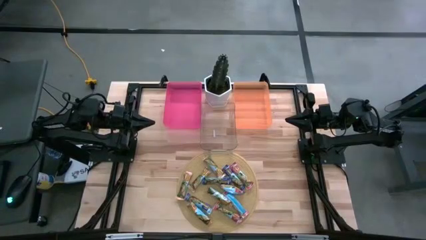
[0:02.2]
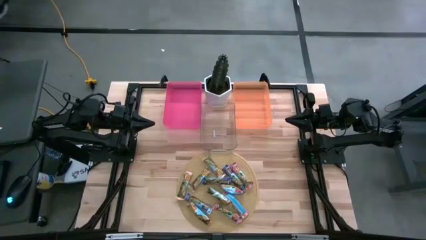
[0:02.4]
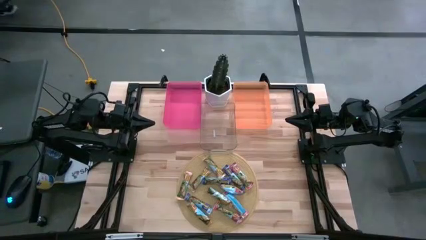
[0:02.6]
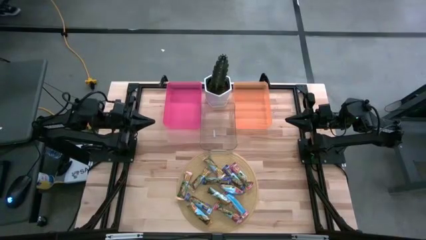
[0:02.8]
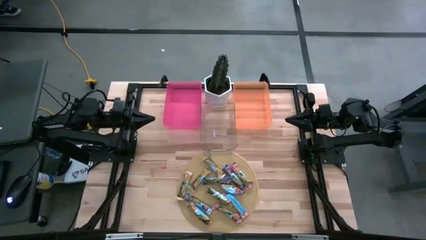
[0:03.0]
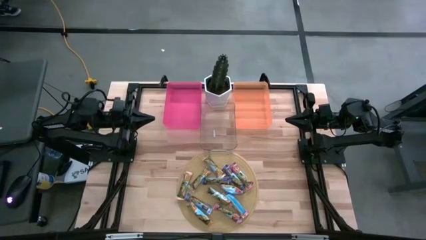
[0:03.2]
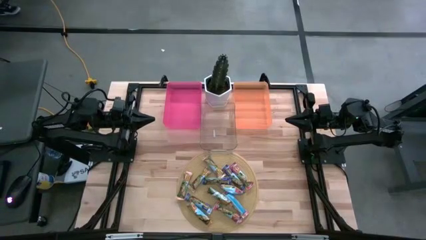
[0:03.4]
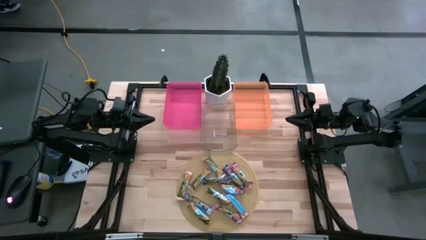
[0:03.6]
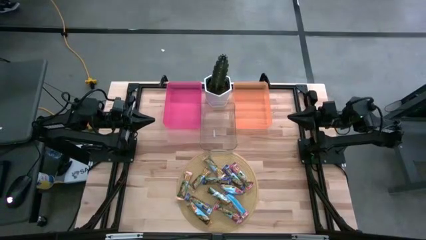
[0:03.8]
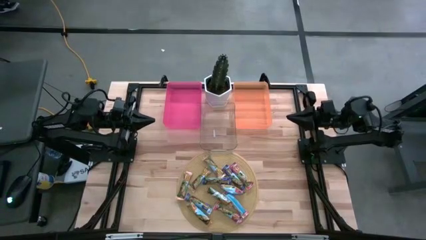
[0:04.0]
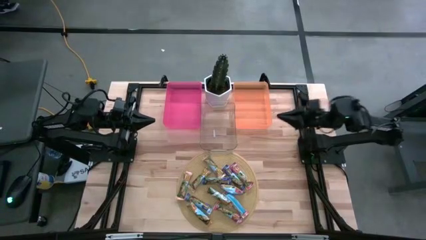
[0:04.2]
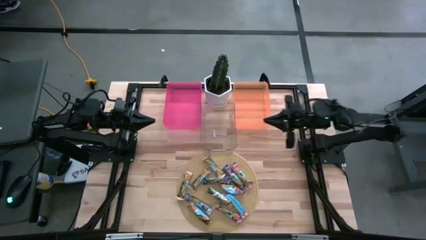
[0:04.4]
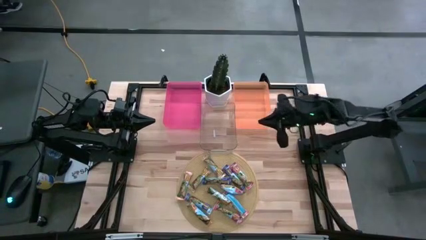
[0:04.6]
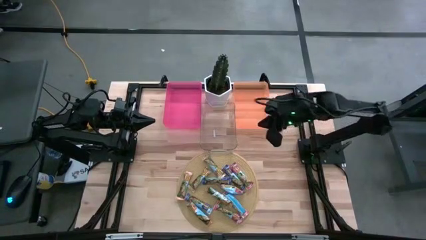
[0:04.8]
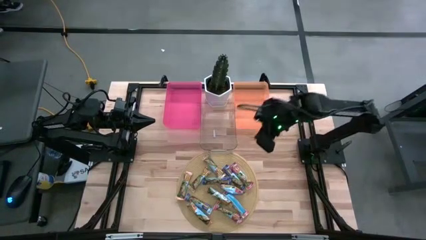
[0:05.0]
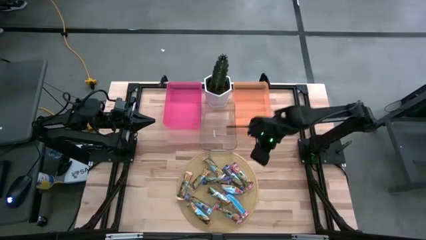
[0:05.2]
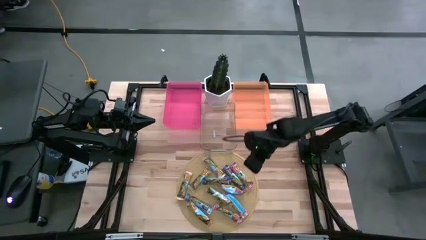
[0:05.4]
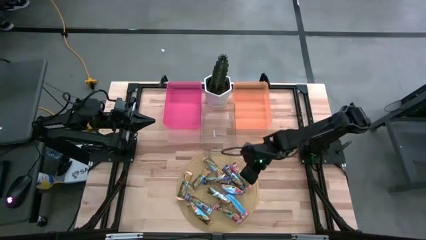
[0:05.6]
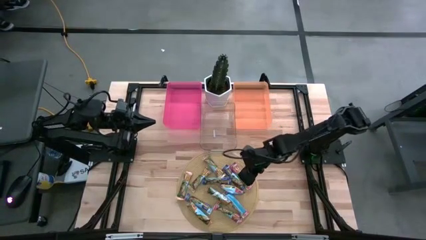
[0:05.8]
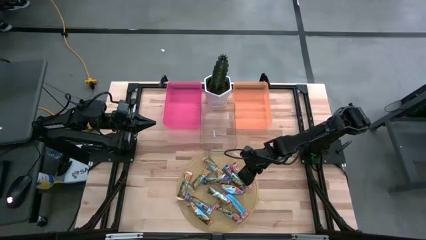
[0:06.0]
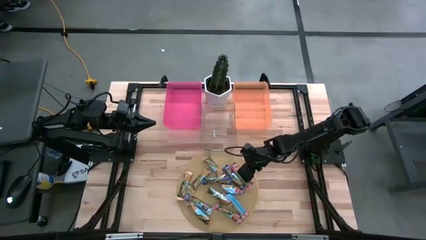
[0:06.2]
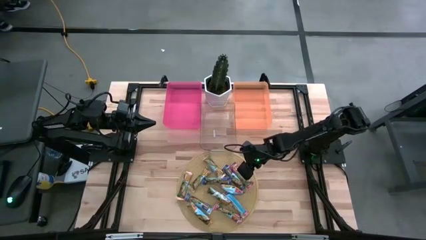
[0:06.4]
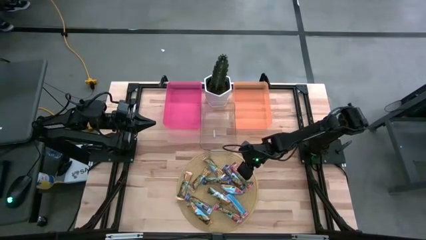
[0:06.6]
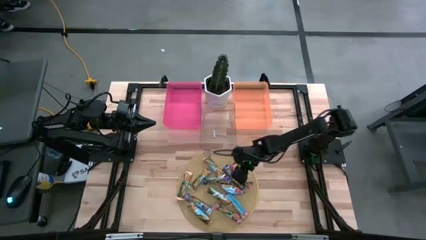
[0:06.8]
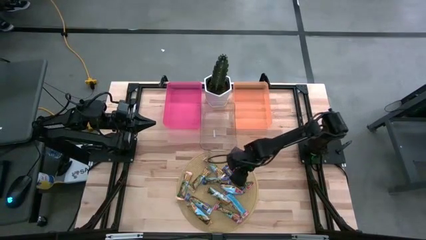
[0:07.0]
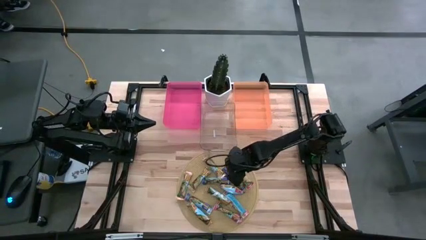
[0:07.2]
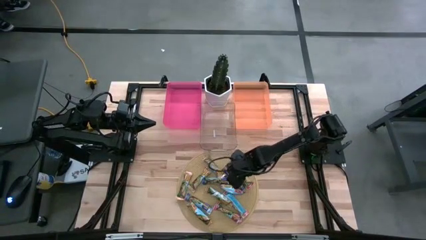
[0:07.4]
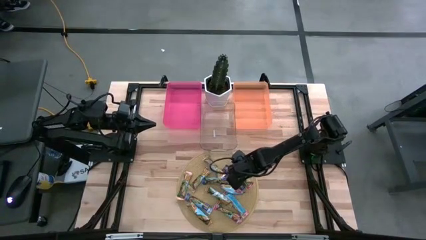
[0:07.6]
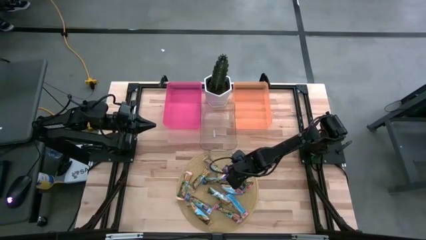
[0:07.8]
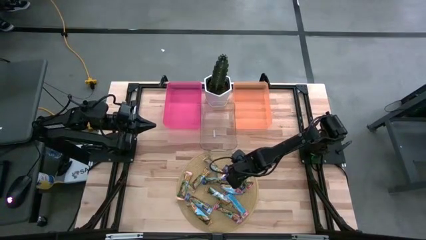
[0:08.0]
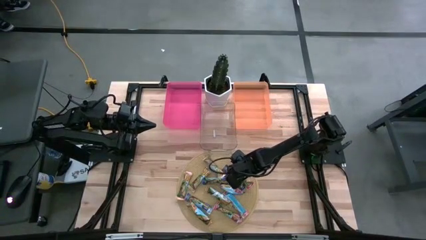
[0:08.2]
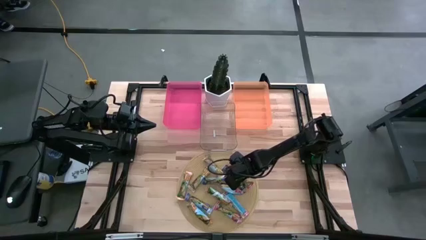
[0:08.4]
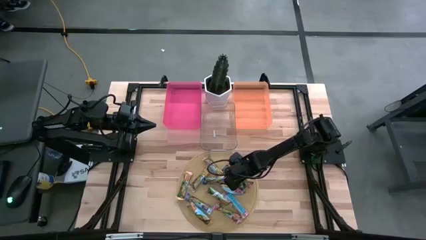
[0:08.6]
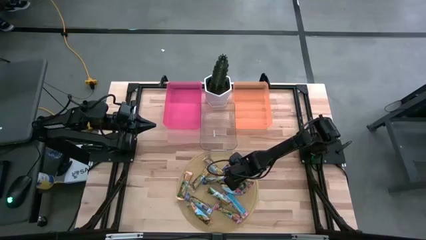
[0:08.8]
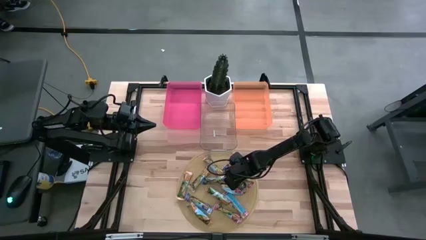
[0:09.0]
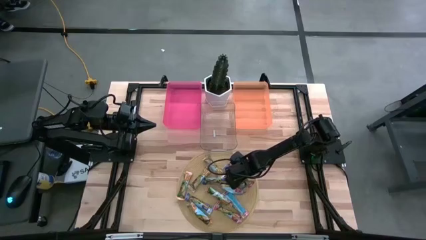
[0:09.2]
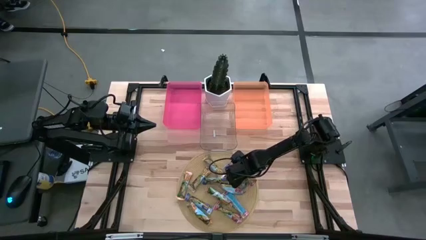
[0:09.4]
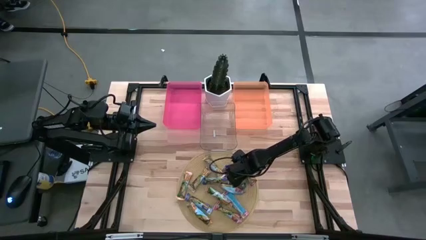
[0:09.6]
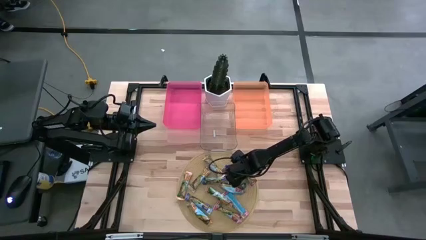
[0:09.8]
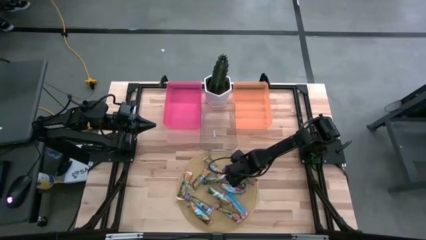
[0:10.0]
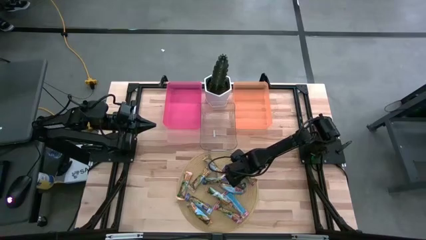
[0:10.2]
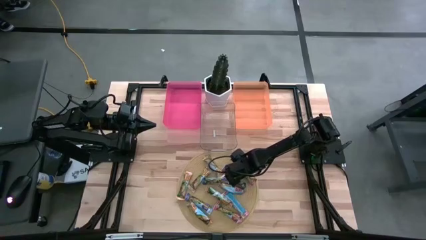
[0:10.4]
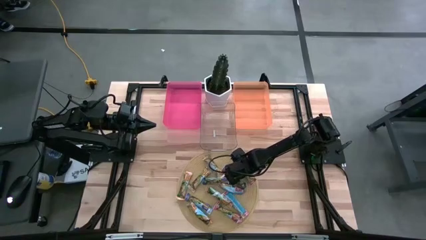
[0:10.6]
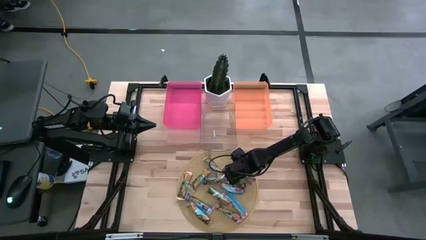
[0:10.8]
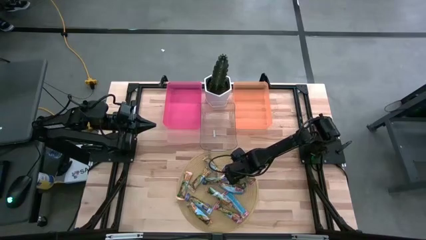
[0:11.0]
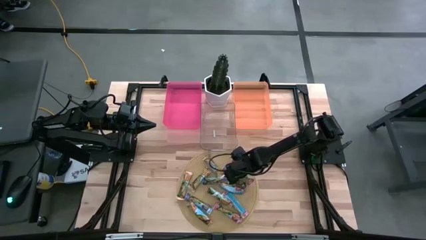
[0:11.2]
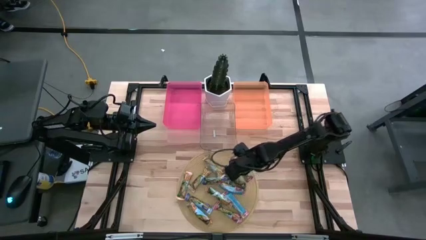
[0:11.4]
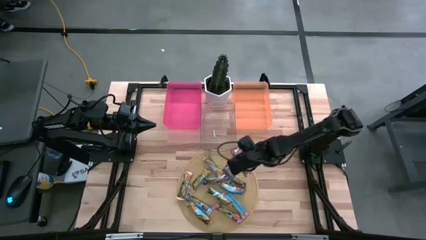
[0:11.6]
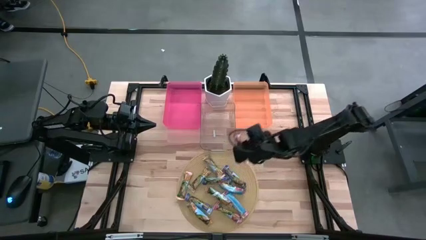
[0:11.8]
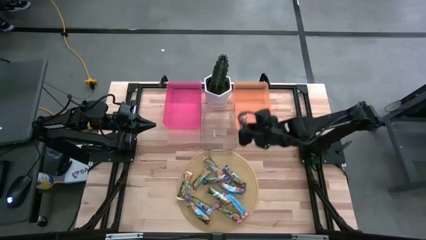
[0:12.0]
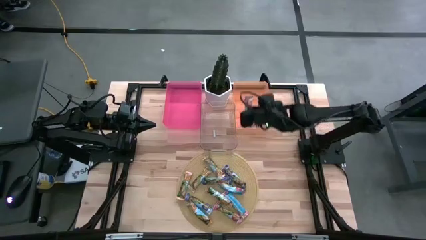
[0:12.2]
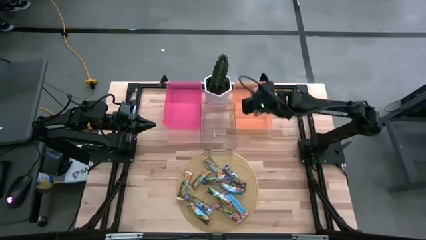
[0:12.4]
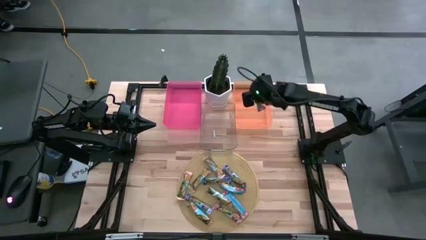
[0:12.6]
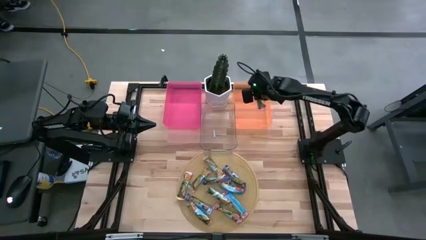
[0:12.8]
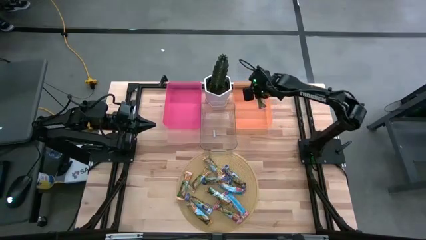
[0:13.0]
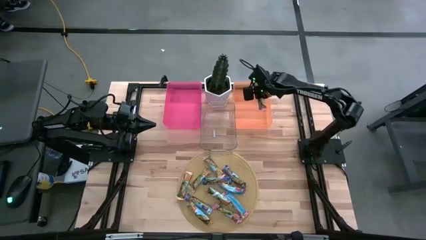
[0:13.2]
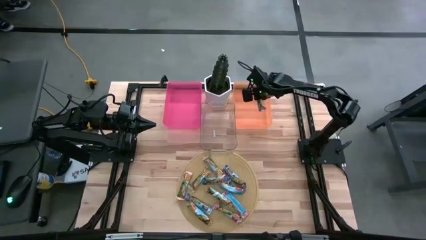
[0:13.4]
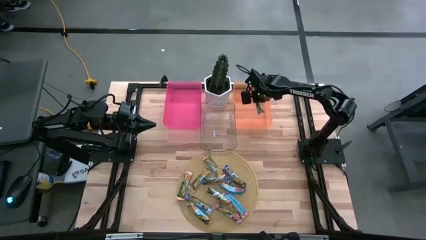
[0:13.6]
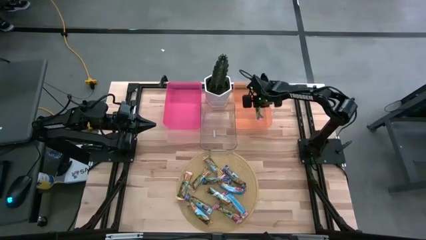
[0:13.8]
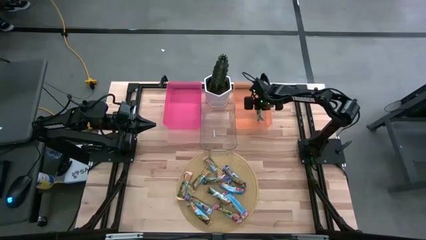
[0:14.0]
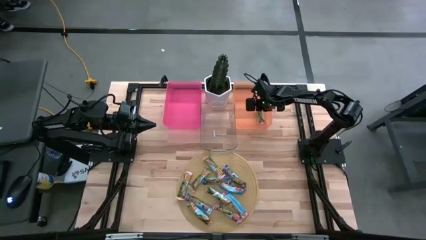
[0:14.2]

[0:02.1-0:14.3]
Task: Pick and place Granola Bars by type
Put the red granola bar into the orange bin
